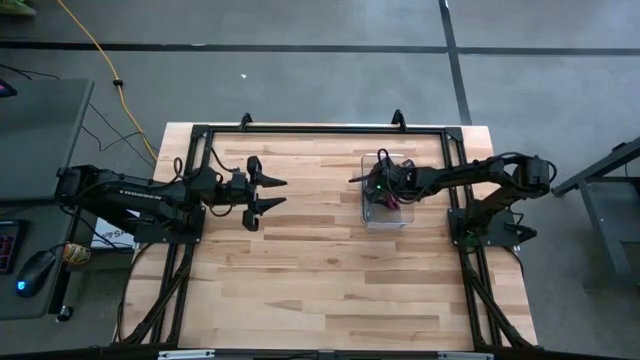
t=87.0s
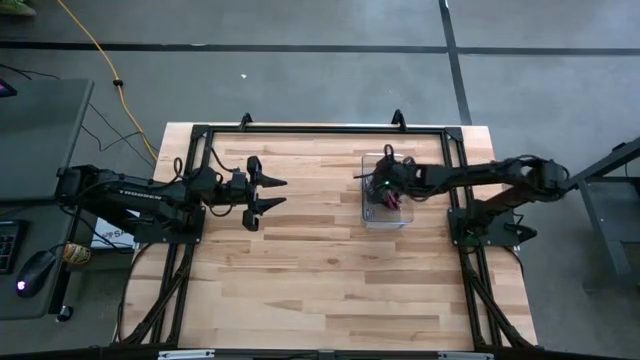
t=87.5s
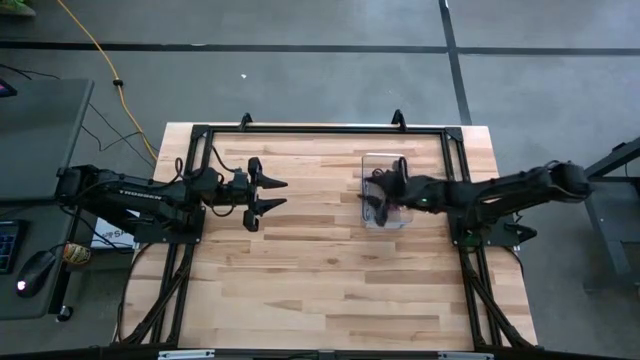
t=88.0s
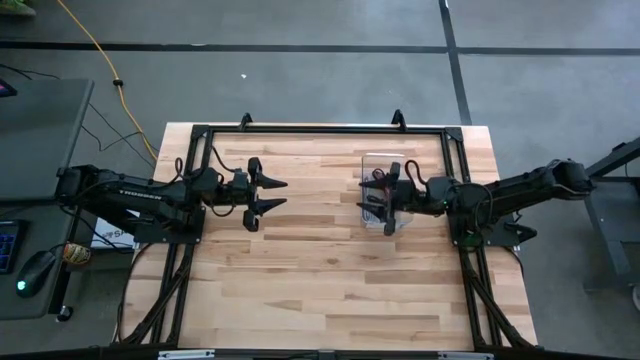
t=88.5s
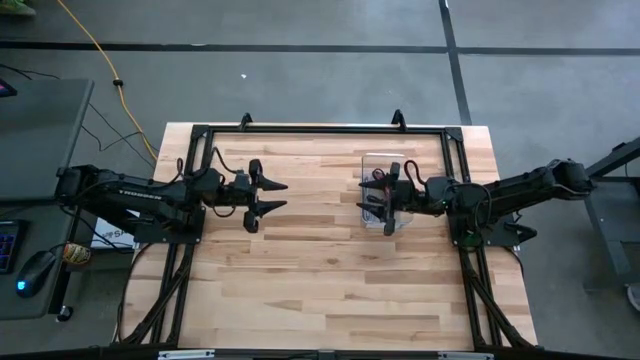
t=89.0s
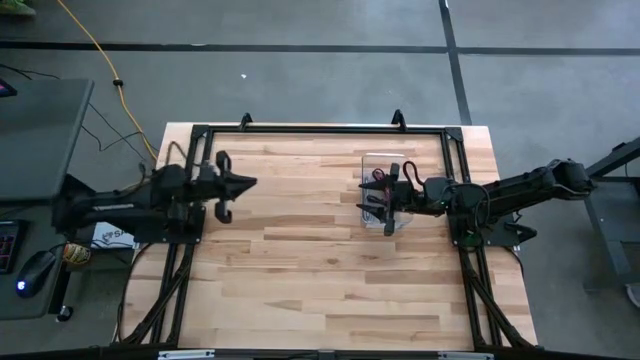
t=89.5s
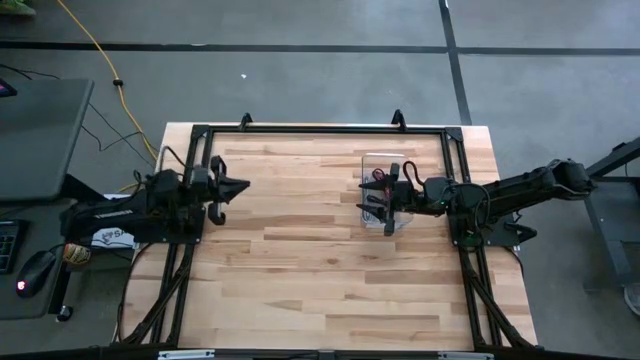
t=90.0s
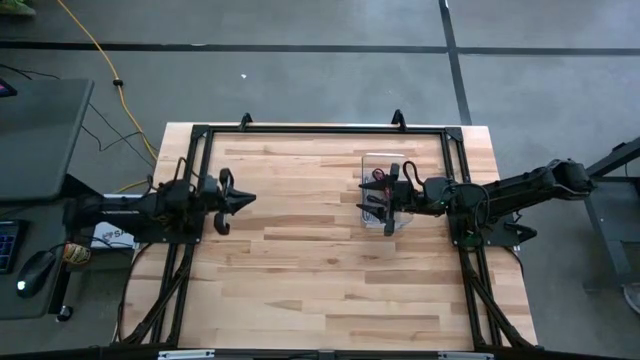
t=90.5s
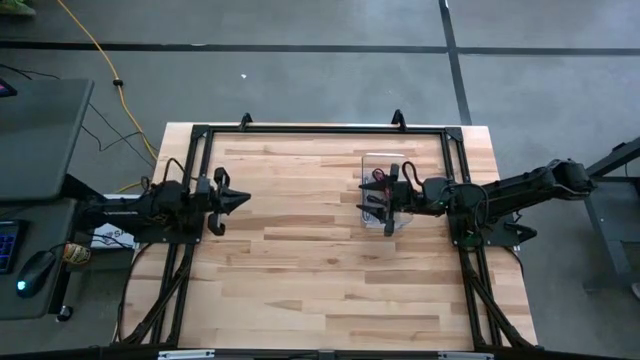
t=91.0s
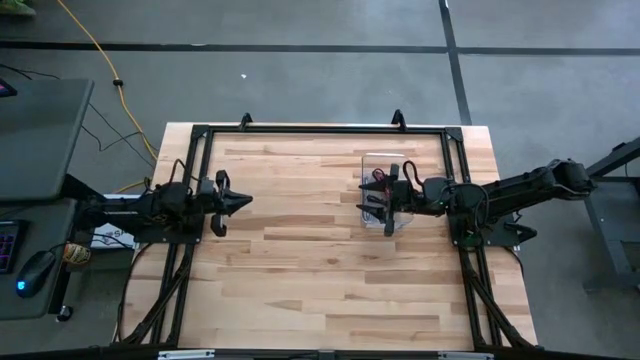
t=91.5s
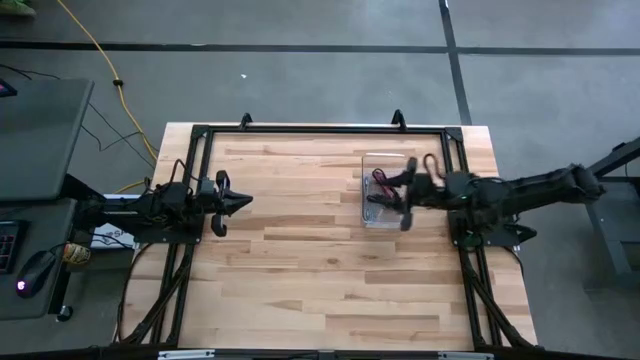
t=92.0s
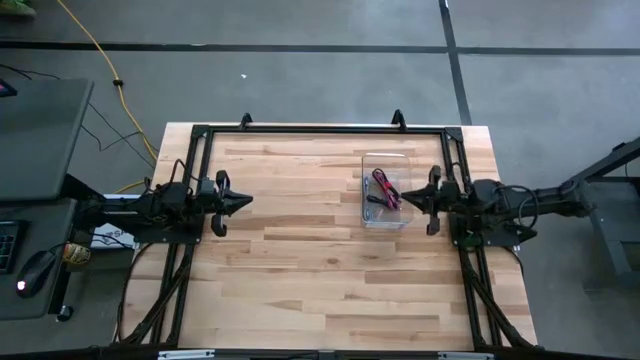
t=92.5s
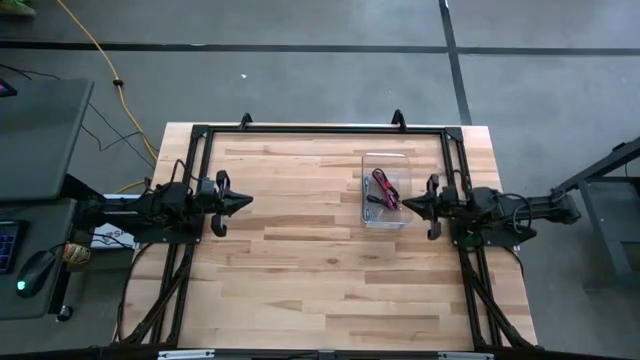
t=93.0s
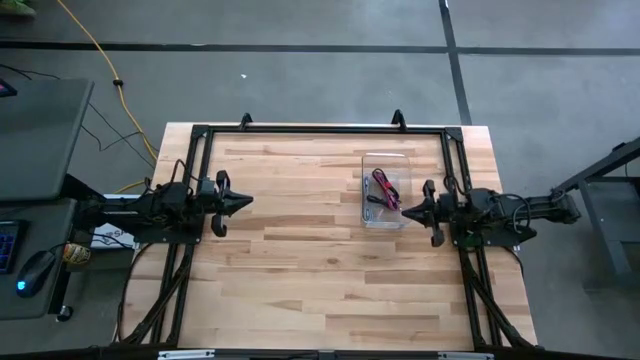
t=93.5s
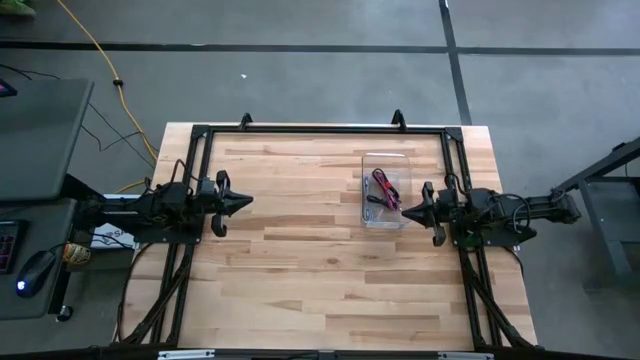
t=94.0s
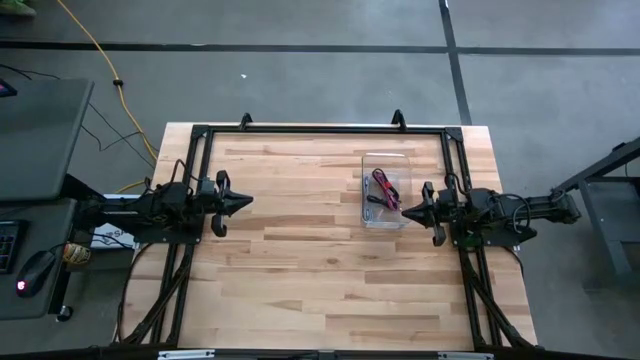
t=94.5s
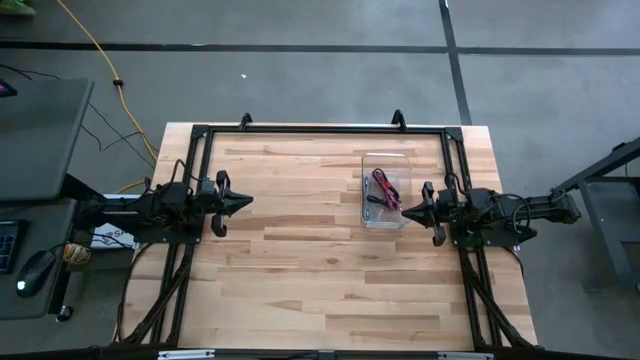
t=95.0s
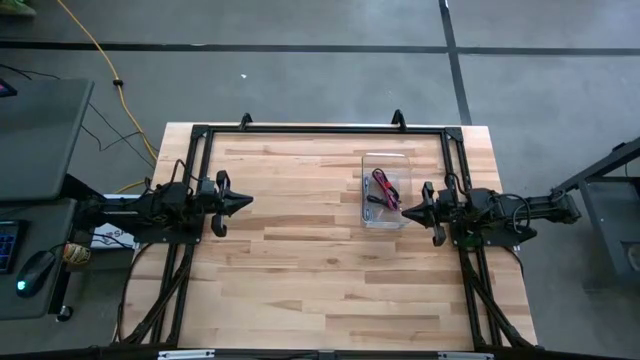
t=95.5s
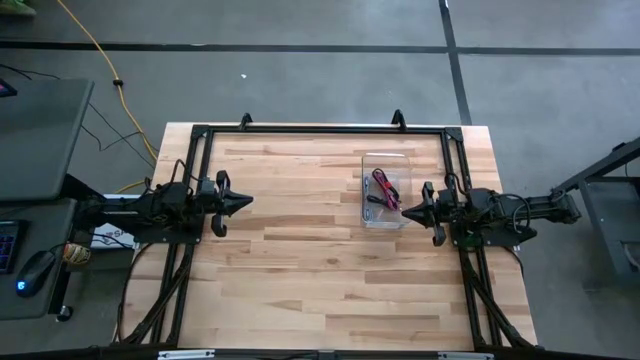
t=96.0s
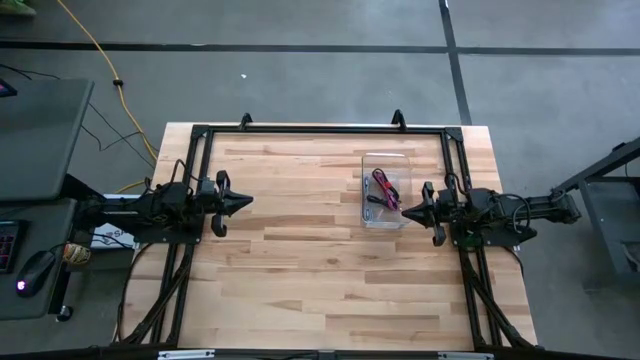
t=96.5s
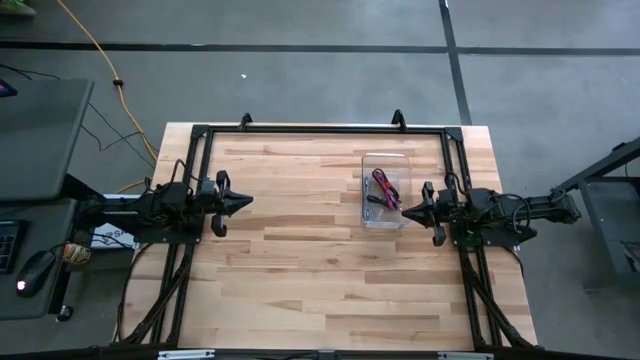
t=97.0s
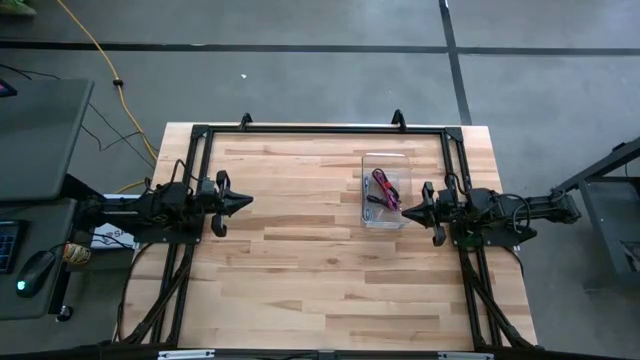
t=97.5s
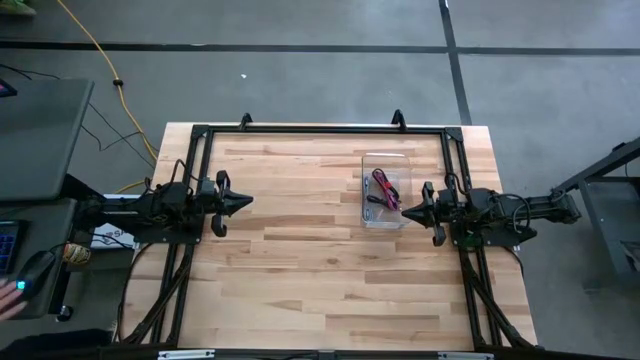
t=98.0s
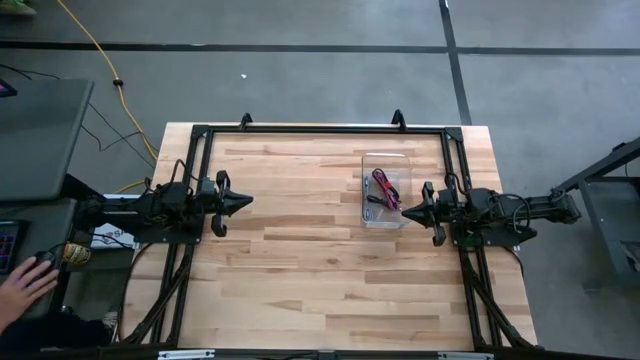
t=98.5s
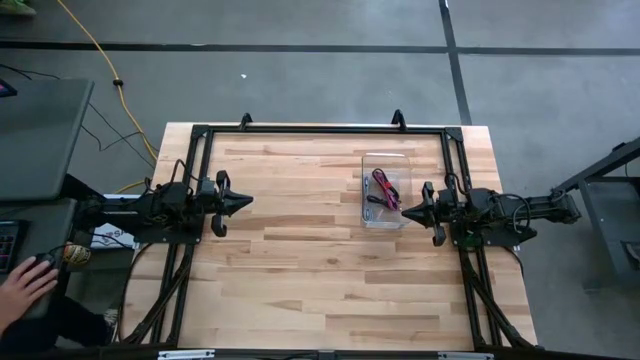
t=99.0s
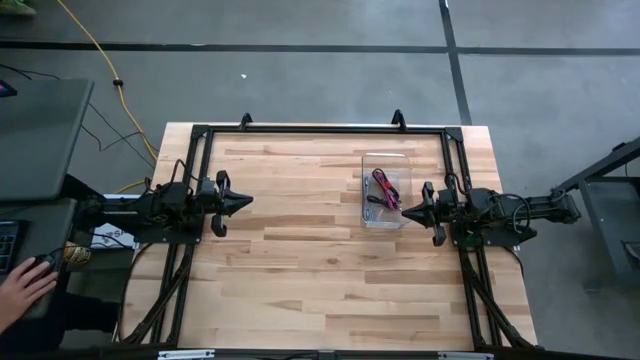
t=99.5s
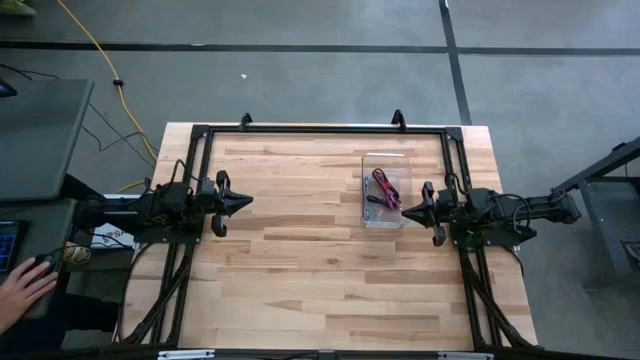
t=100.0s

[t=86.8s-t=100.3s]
Task: Pick and place USB-C Cables
Return to Home Position

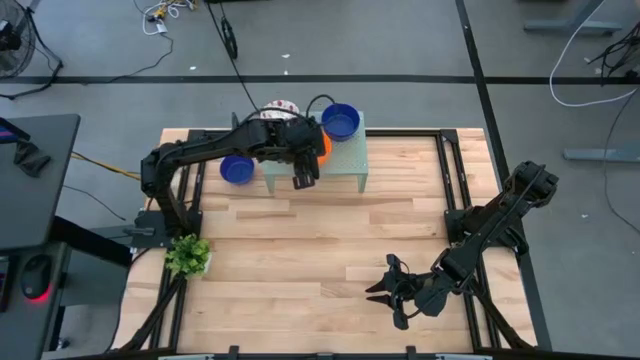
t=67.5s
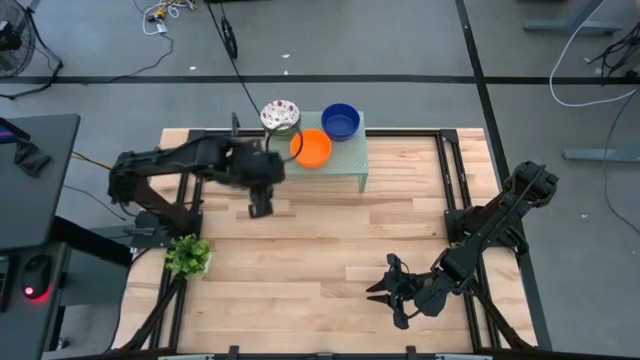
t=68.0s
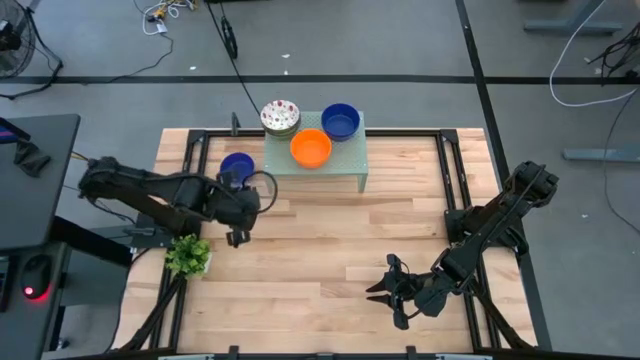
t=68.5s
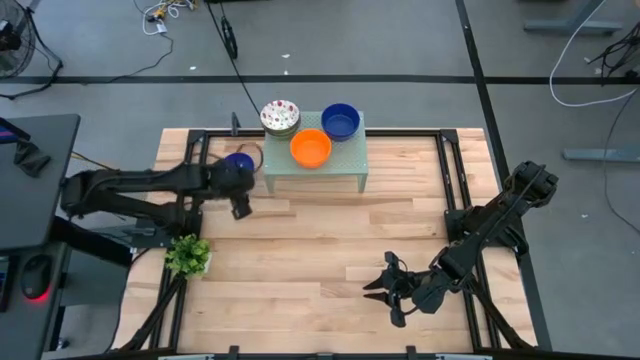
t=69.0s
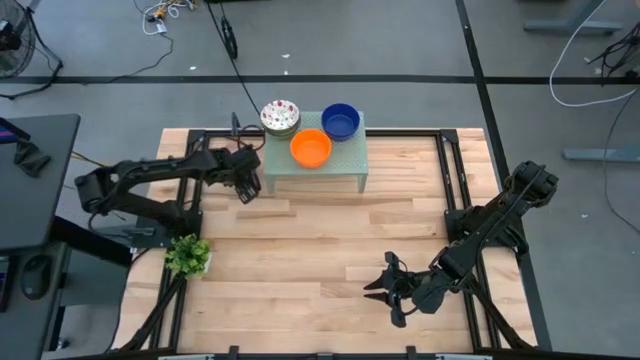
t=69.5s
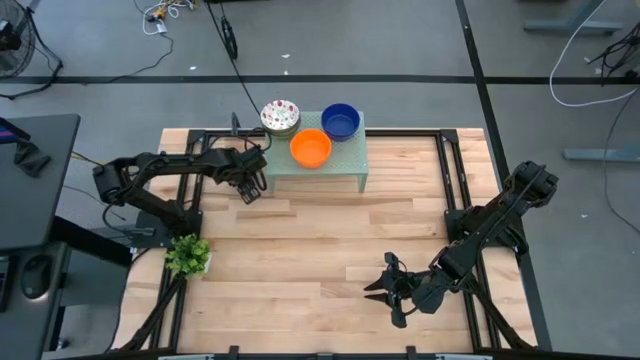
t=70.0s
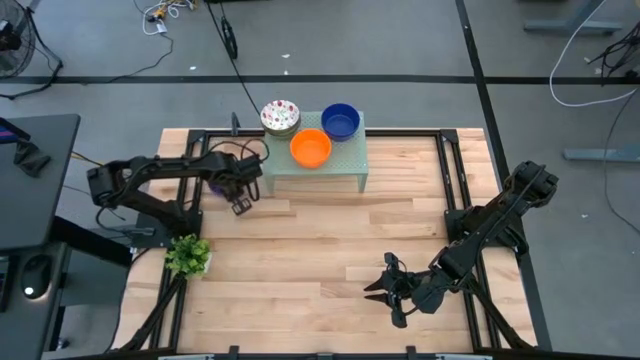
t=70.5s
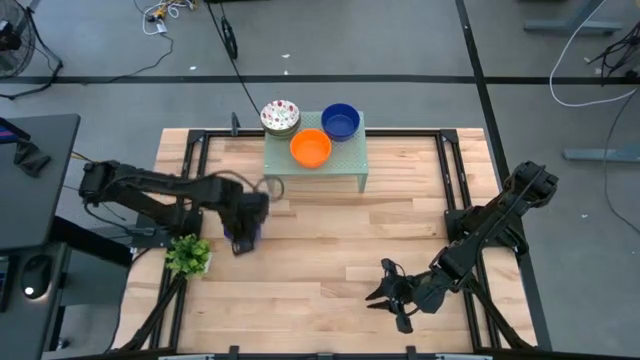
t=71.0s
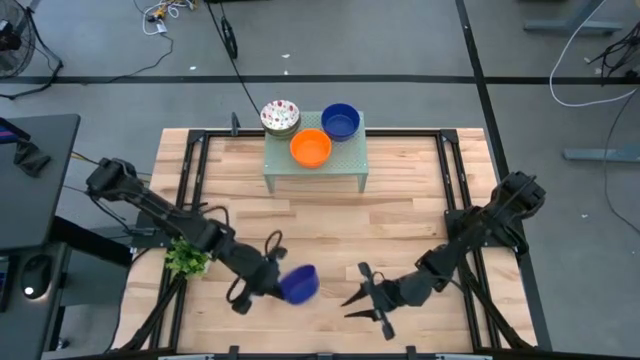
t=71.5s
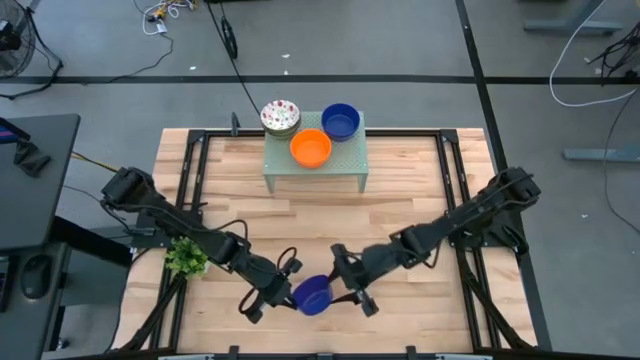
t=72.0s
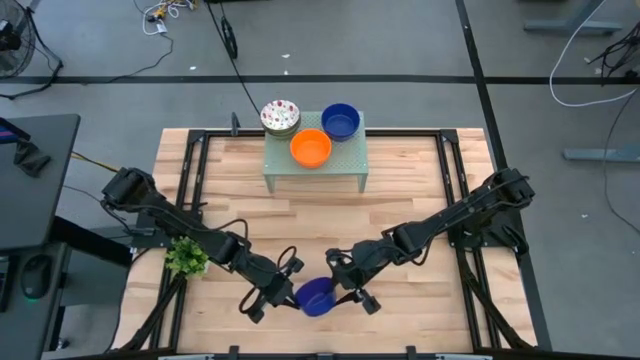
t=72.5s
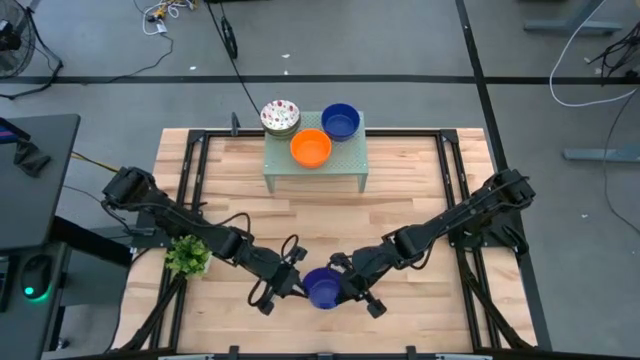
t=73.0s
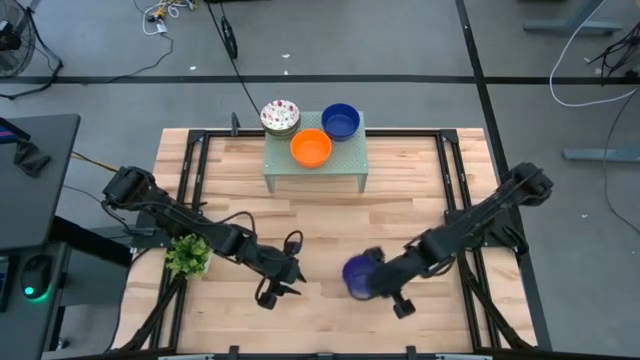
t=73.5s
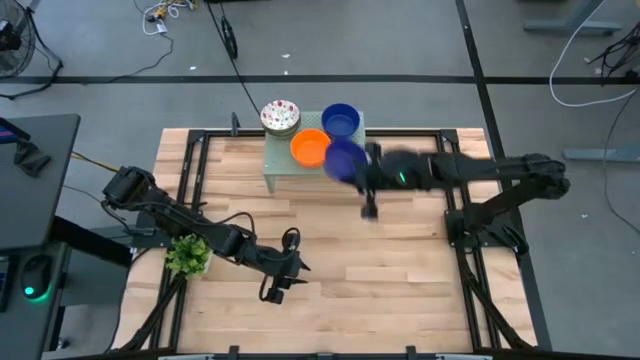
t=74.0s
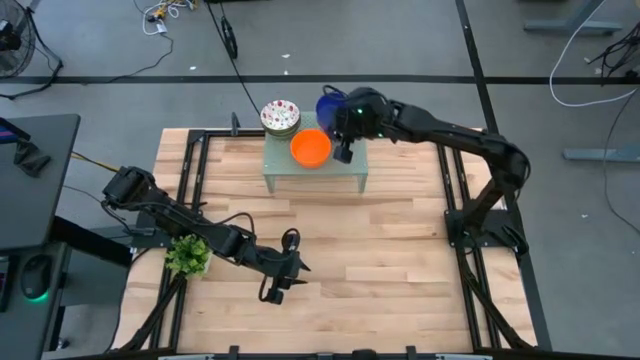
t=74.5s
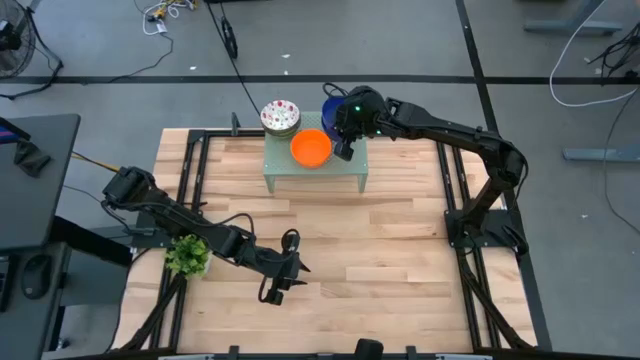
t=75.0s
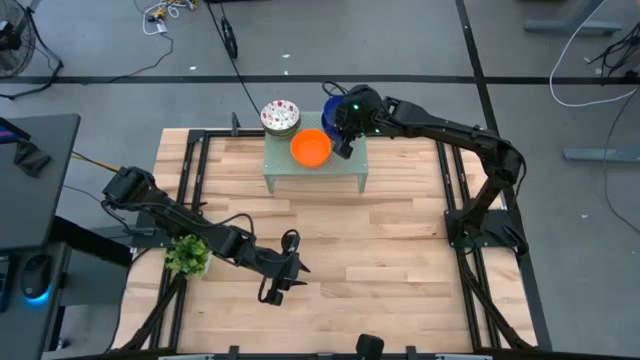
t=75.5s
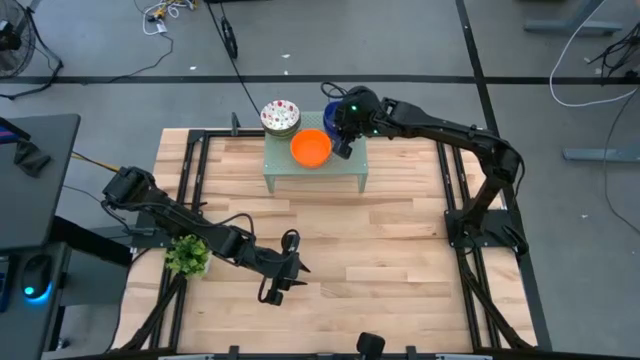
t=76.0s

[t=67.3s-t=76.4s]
Task: Pick & Place Mini bowls
Stack the blue bowl on the blue bowls on the shelf

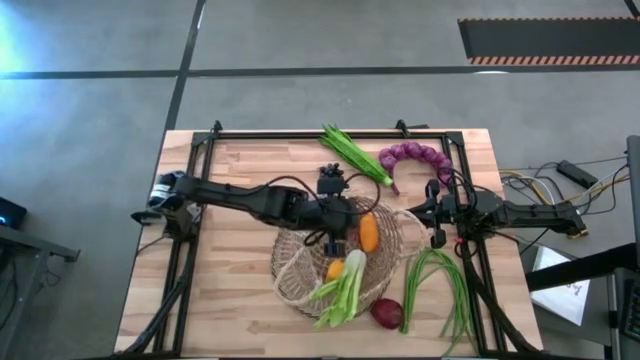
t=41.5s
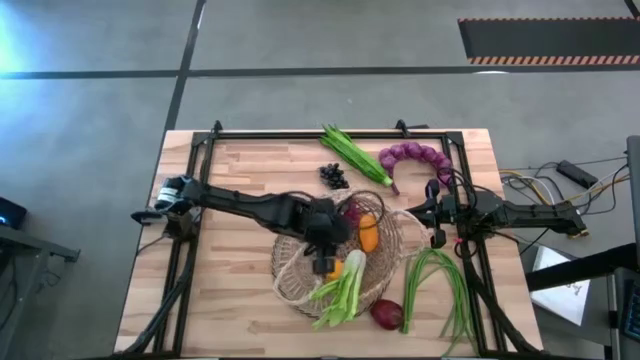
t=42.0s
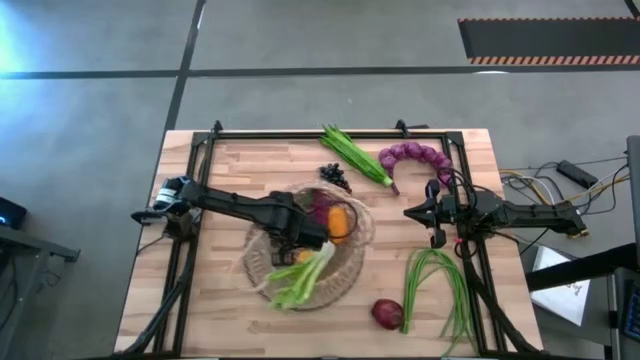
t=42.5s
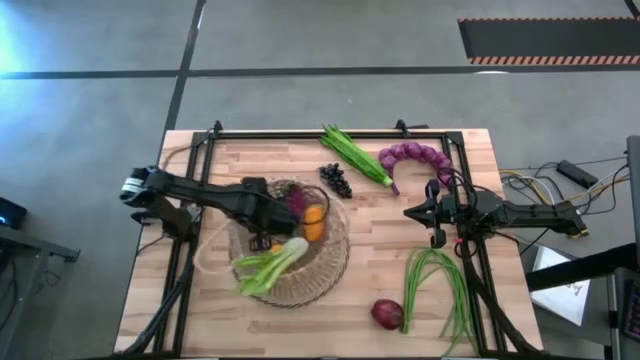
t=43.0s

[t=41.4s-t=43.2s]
Task: Build produce basket
Adjust the basket
